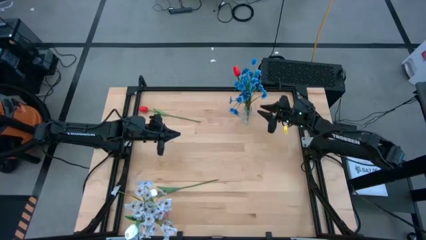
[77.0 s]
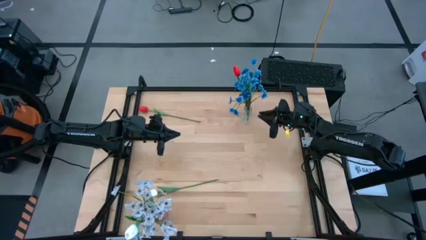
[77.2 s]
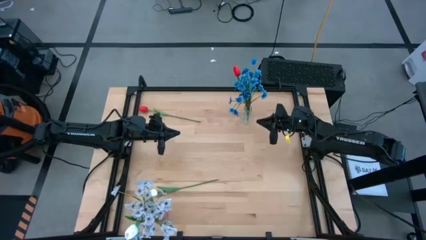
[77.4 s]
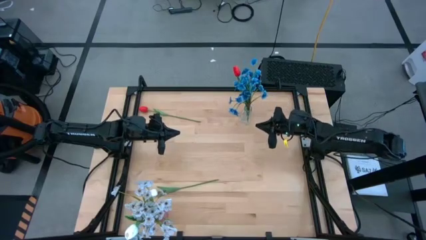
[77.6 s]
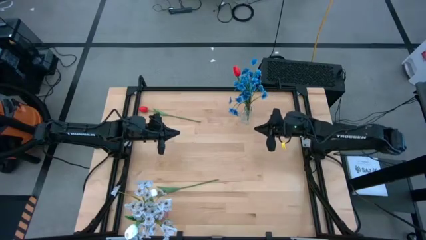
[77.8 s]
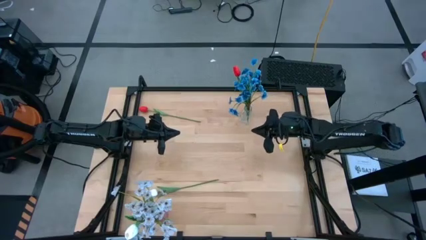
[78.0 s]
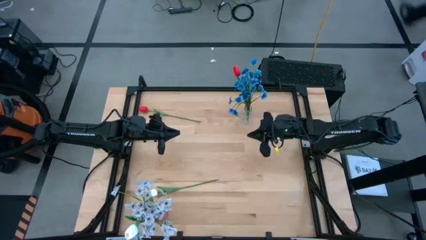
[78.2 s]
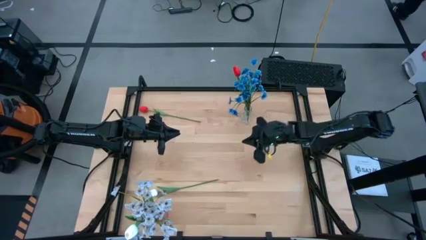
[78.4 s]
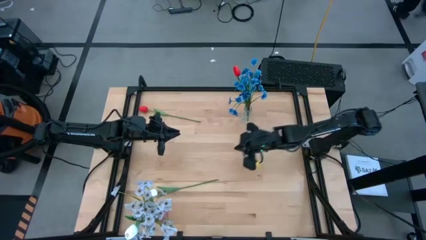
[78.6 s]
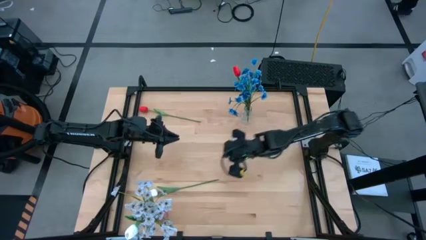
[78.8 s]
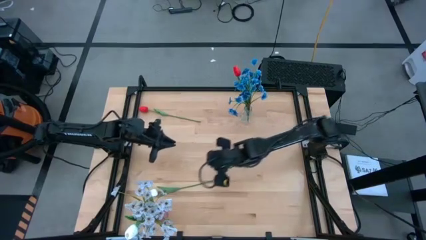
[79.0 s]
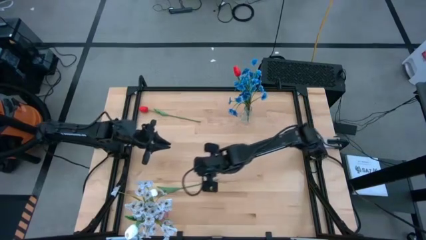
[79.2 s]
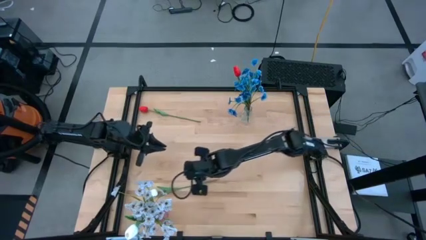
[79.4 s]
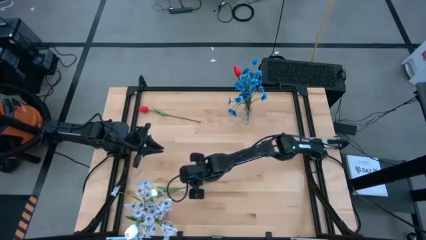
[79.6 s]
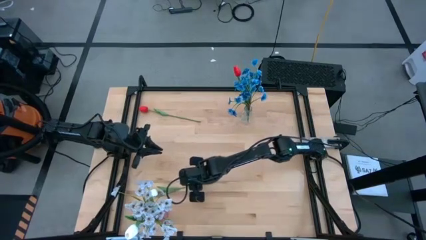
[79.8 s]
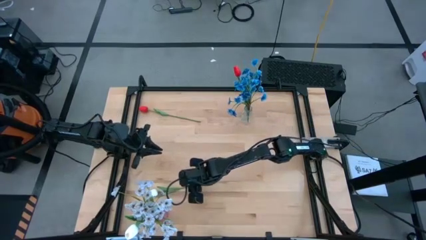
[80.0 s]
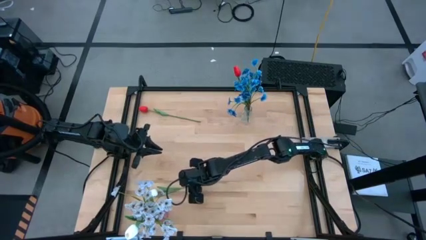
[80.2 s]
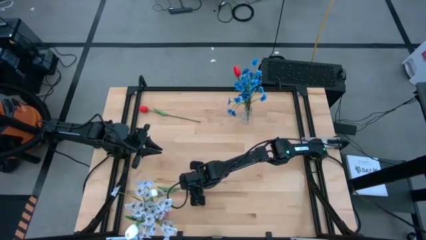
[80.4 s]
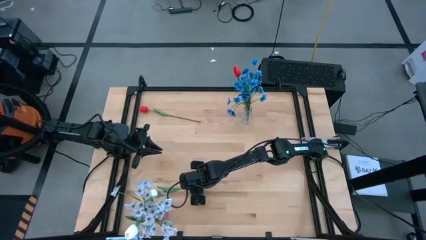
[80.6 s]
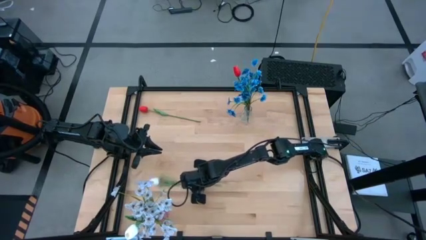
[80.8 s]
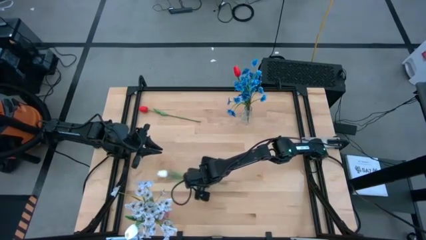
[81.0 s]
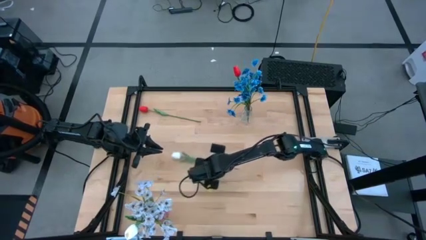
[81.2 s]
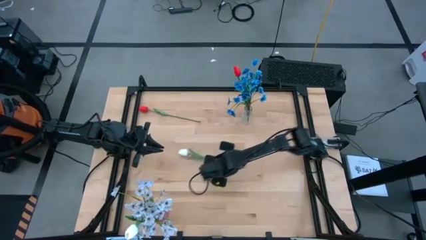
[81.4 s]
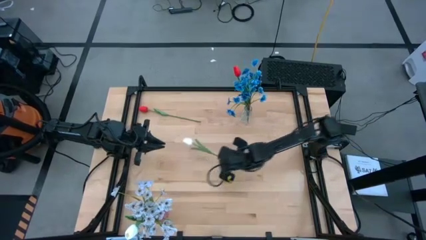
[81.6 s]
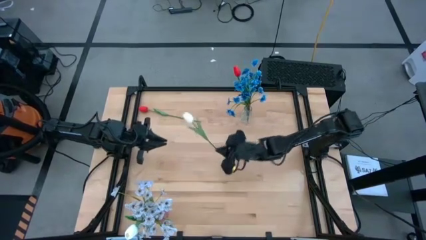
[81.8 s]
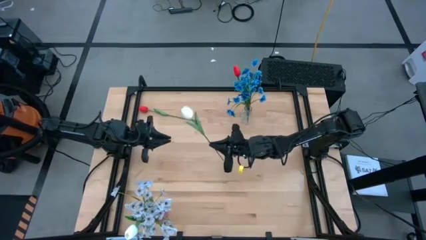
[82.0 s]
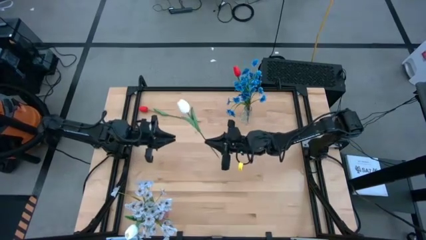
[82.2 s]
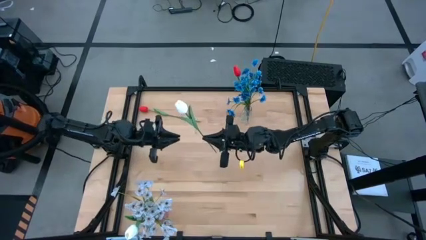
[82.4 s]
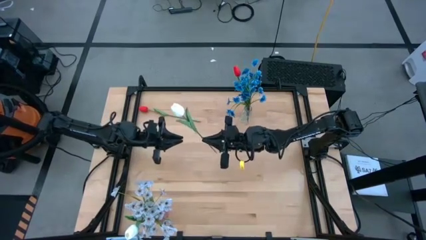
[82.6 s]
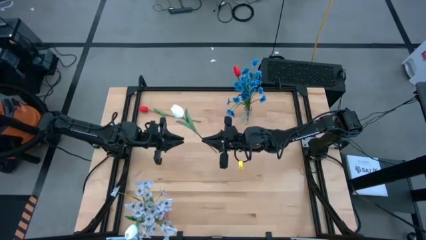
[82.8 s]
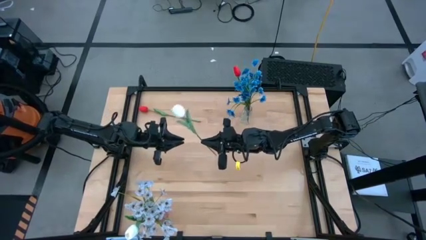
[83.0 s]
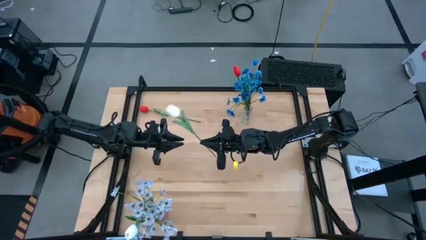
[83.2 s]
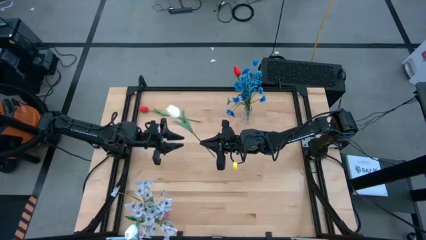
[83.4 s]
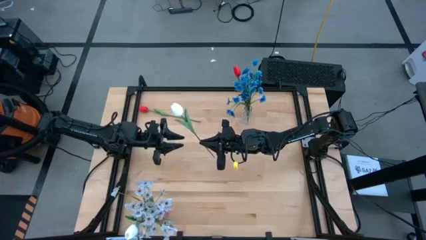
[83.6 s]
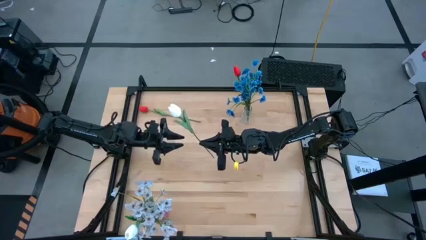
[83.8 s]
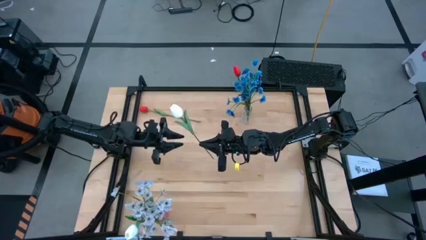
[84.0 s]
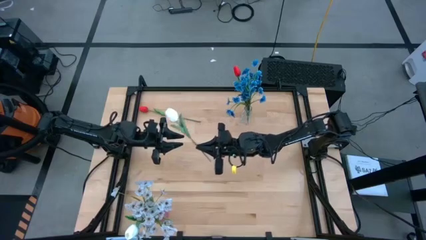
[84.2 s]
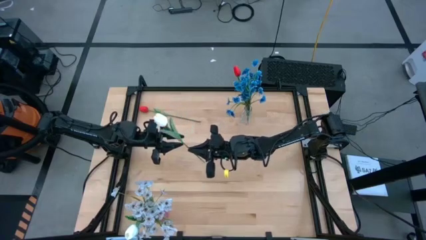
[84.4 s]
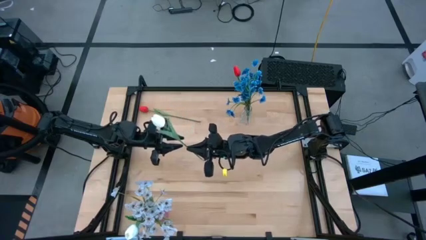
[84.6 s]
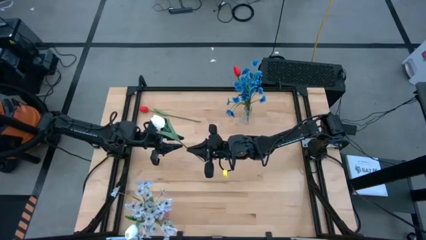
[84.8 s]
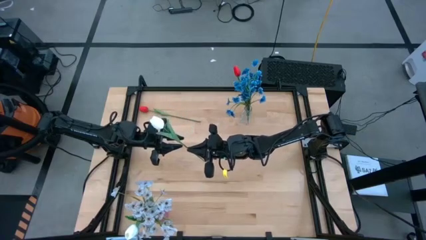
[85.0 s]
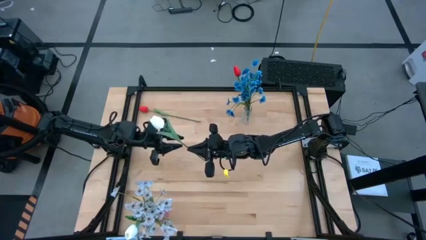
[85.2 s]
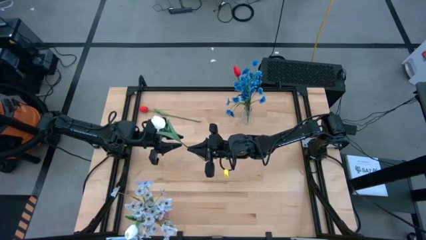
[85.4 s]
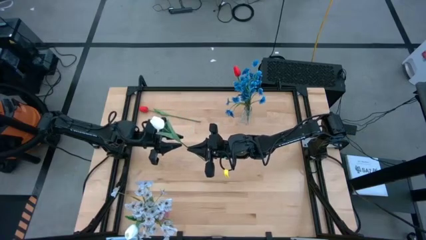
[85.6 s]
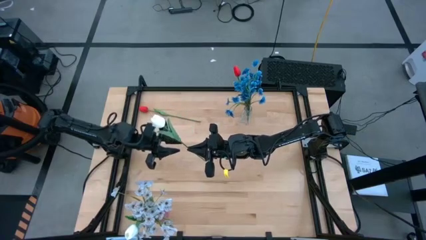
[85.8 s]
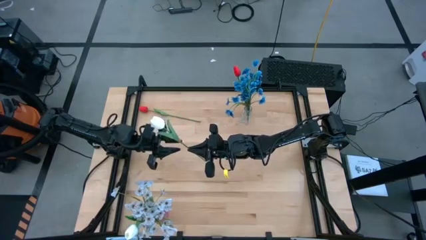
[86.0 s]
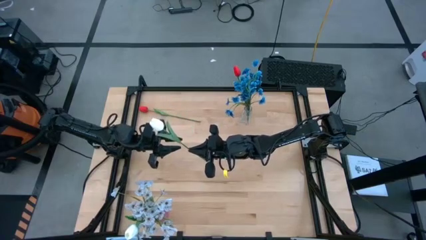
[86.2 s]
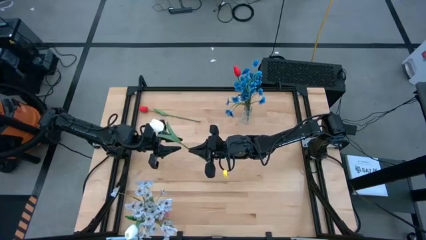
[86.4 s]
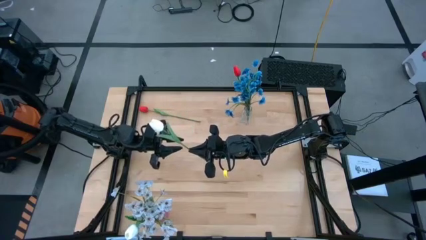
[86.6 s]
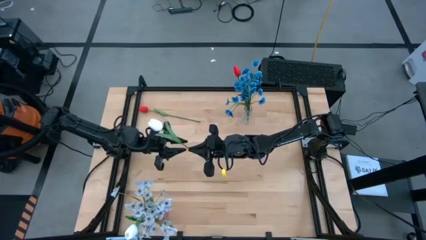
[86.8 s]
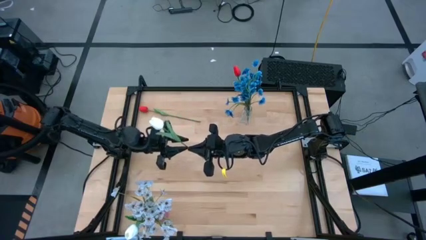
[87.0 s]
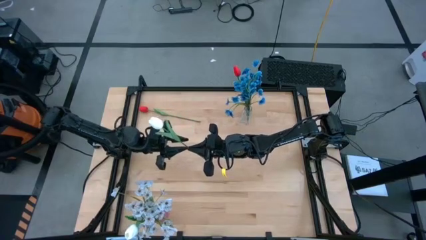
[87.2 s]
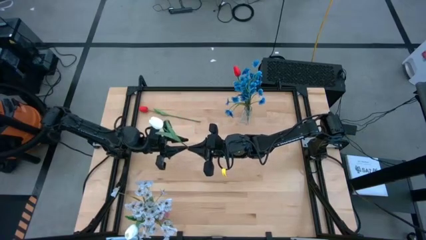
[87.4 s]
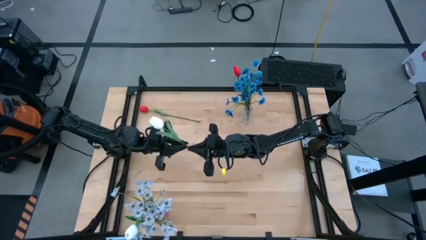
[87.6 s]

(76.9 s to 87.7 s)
Task: Sort flowers into vase by color
Put the white flowers into the pink vase

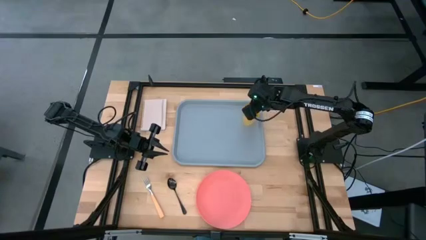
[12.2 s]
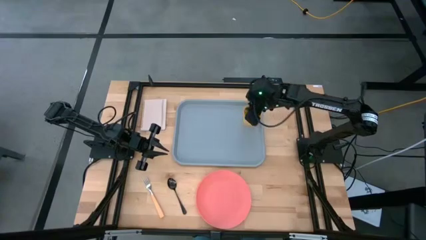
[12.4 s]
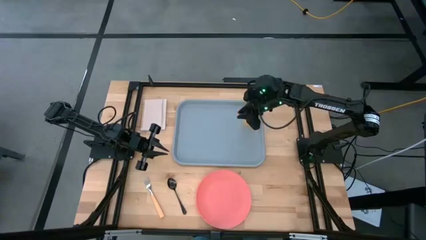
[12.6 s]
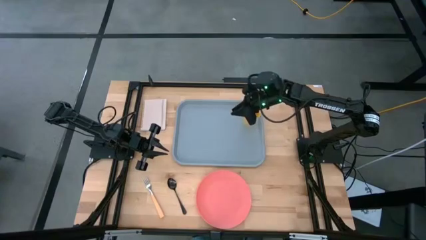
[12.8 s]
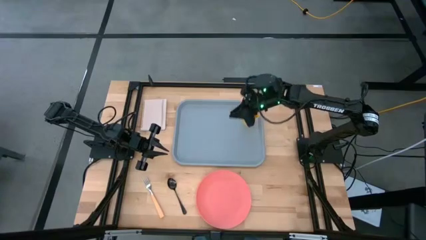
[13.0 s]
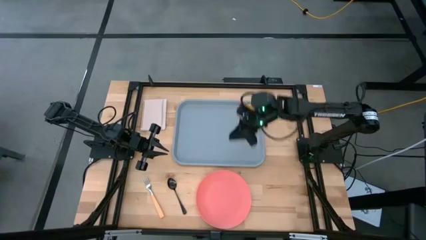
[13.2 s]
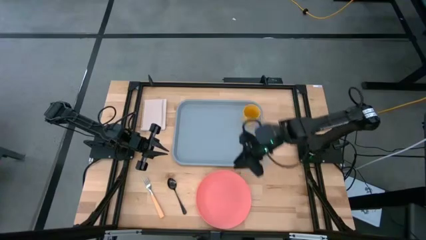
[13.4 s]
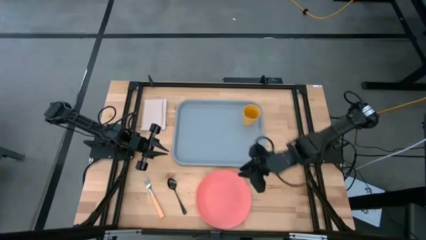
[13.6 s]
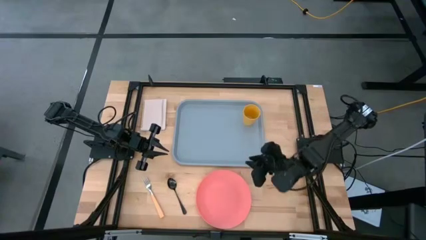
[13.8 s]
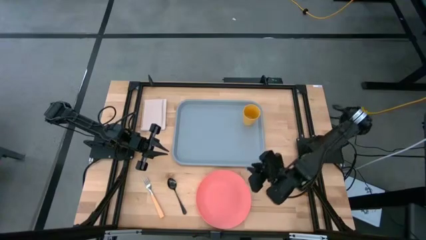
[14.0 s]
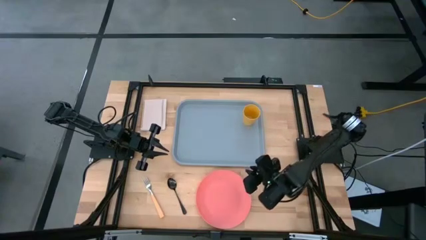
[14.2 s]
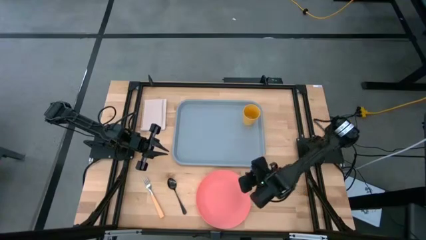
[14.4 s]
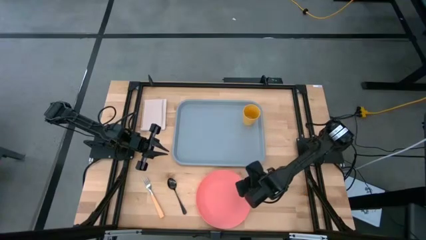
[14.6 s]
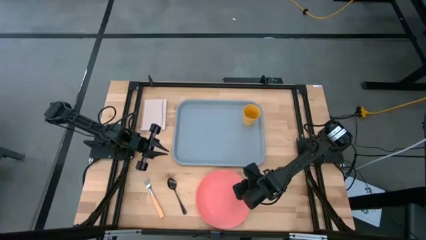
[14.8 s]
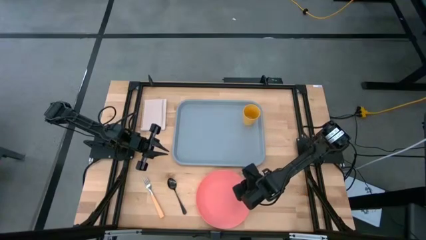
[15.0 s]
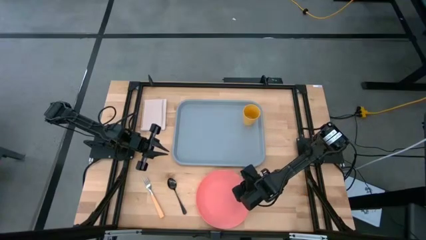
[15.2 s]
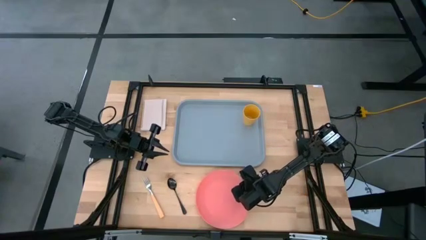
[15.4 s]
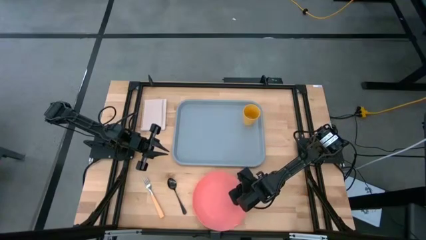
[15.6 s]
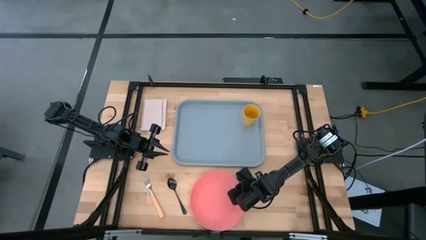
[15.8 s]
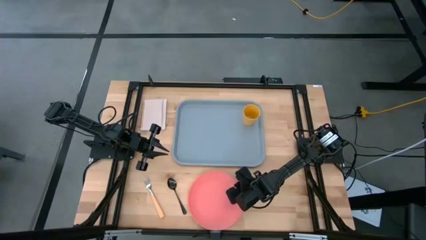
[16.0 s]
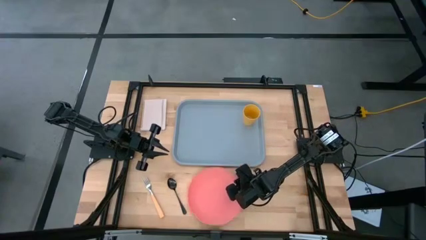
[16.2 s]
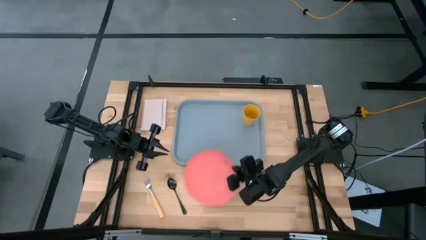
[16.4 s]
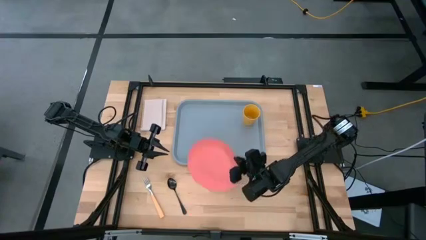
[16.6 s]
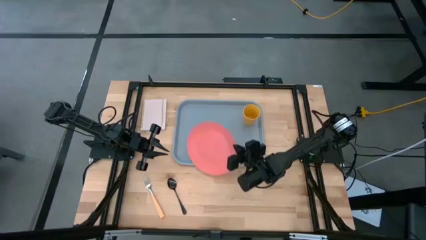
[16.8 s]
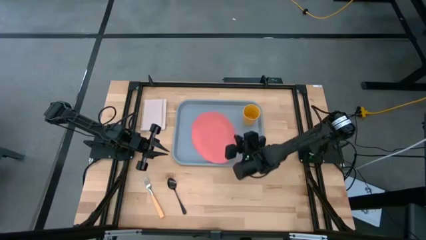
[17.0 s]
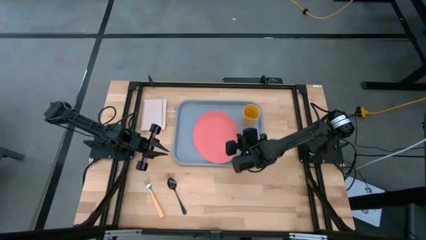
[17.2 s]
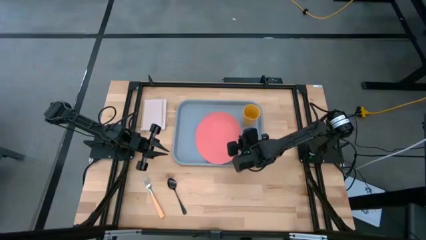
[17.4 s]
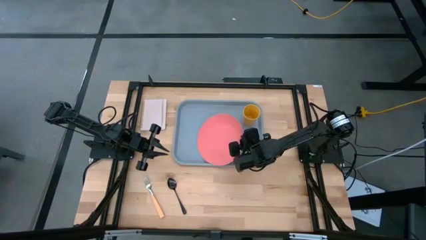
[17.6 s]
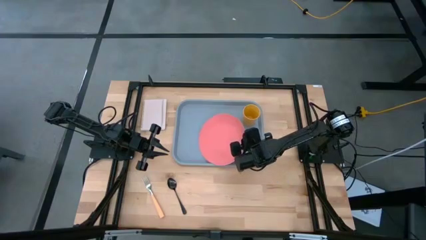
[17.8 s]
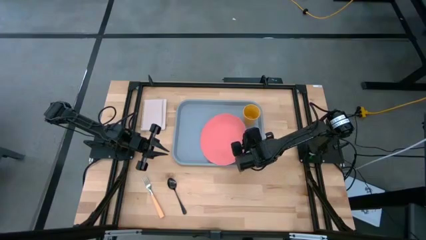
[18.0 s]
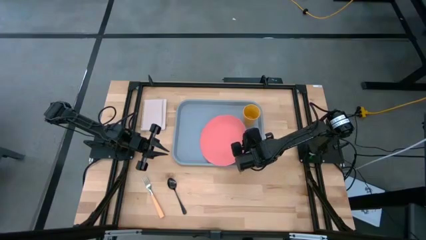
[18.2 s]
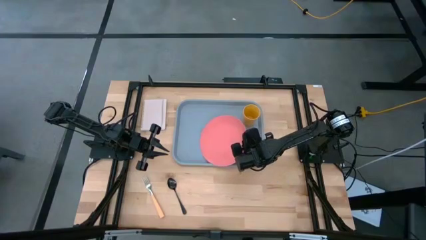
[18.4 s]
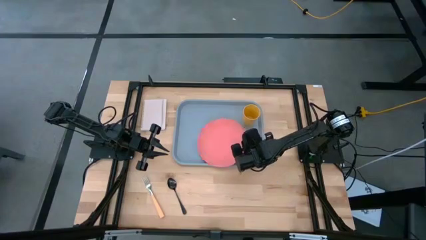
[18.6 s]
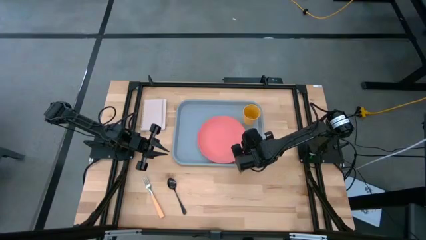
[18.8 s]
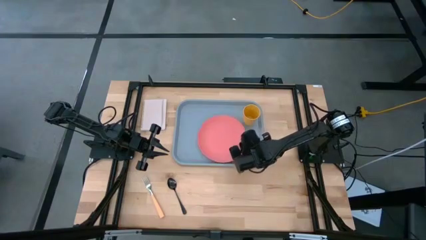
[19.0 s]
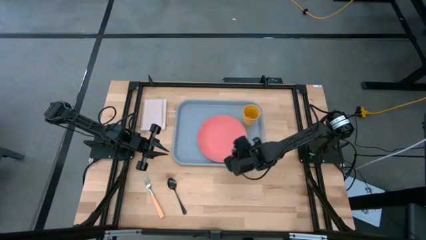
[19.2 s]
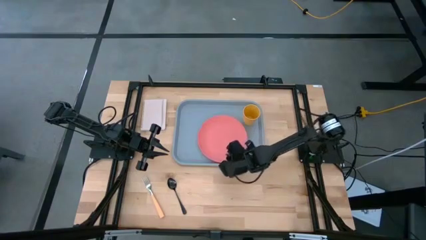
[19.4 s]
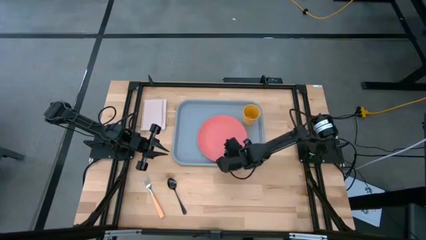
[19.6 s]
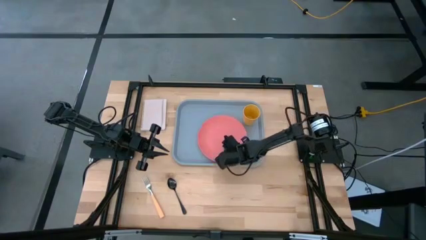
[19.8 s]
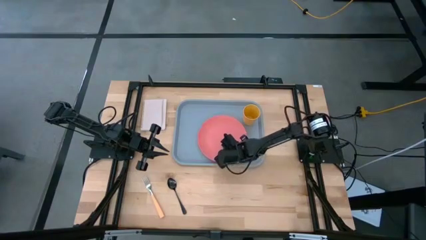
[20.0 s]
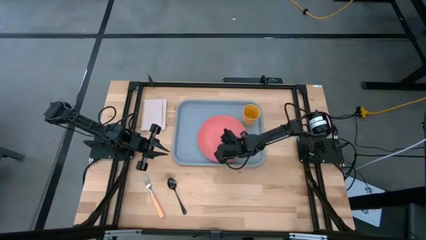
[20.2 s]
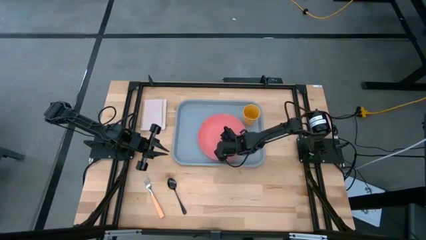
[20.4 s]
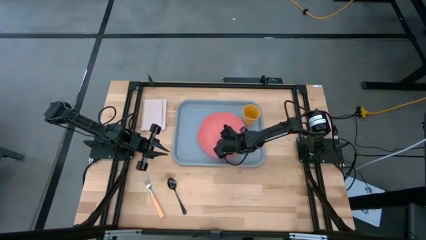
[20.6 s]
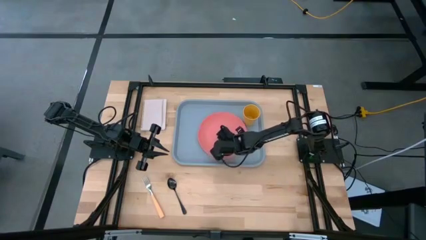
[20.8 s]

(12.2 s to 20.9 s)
Task: Pick and place plate/cup/fork/spoon on tray
Put the pink plate on the serving tray
